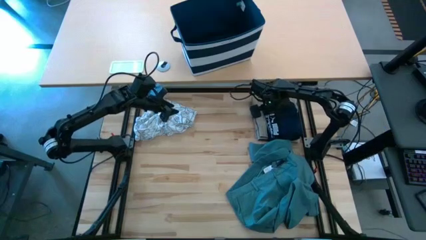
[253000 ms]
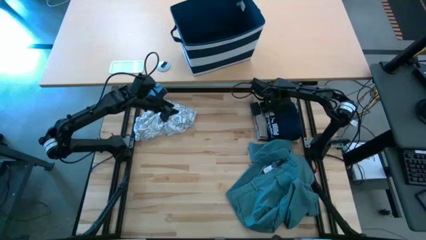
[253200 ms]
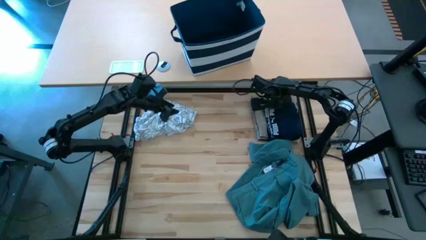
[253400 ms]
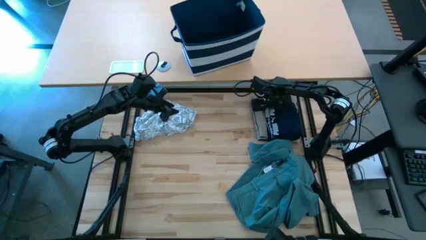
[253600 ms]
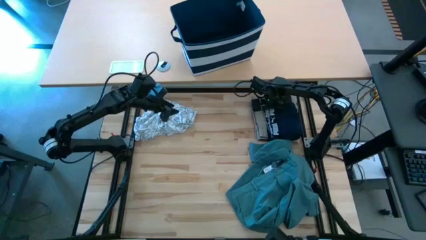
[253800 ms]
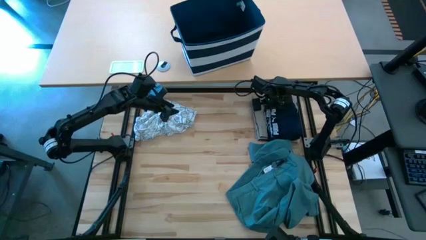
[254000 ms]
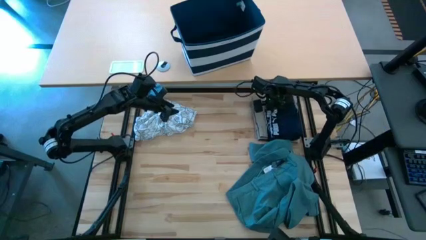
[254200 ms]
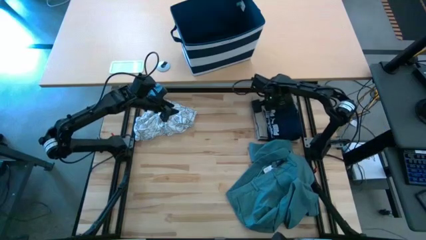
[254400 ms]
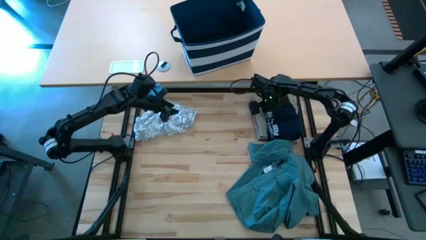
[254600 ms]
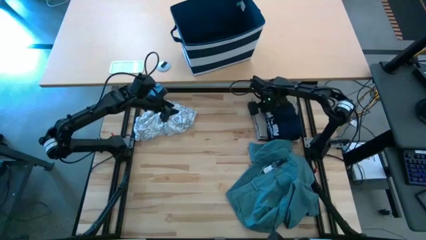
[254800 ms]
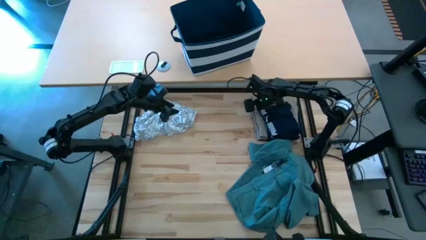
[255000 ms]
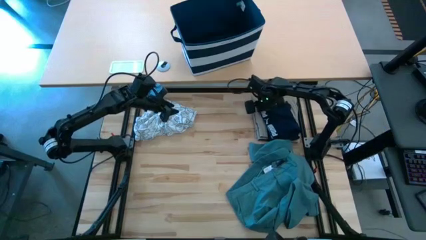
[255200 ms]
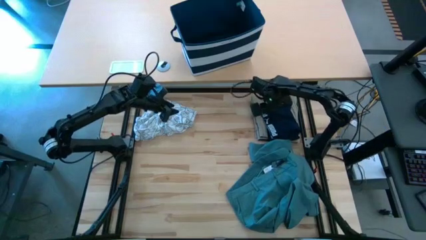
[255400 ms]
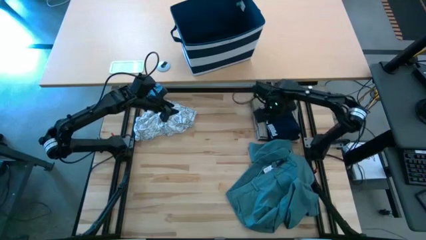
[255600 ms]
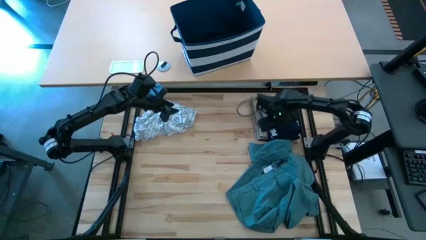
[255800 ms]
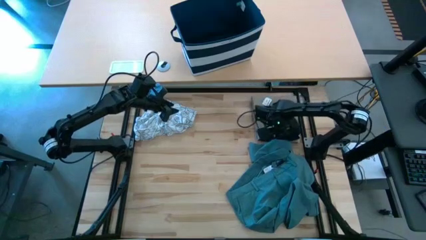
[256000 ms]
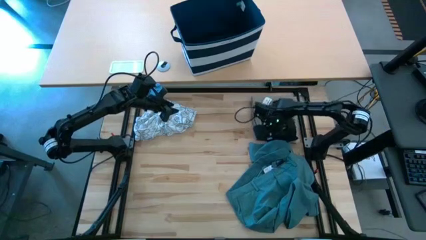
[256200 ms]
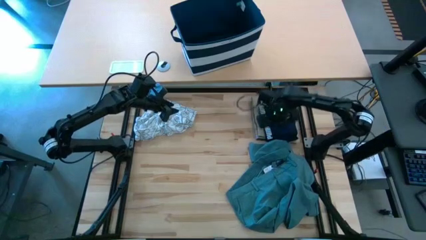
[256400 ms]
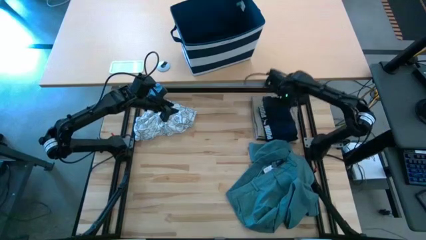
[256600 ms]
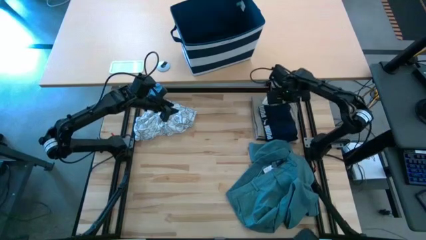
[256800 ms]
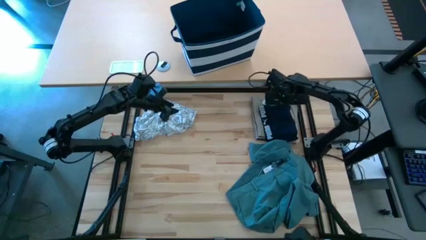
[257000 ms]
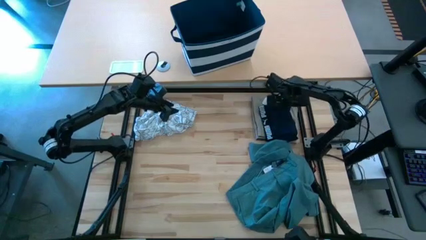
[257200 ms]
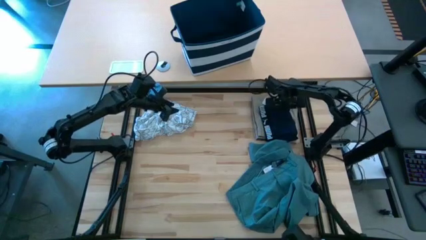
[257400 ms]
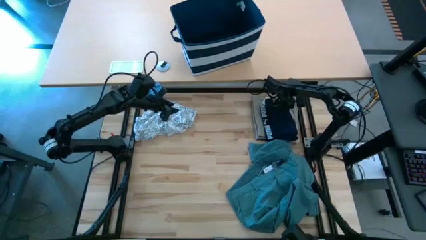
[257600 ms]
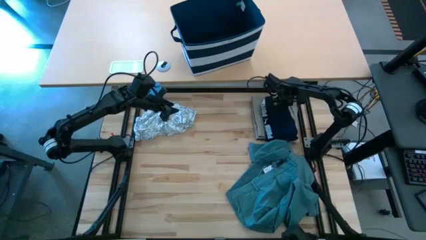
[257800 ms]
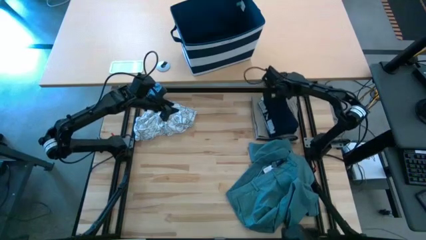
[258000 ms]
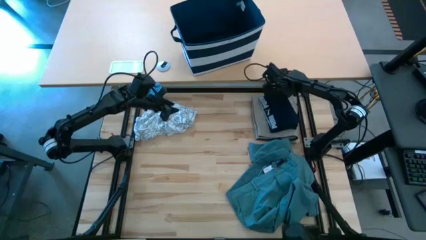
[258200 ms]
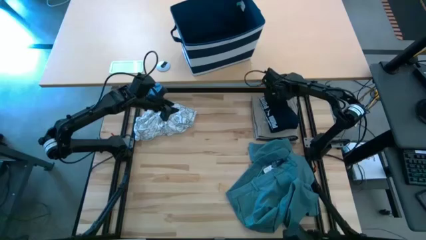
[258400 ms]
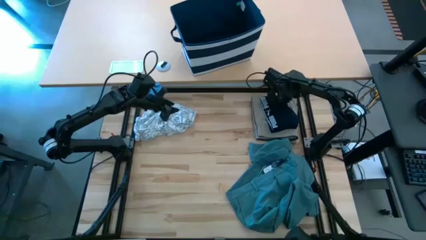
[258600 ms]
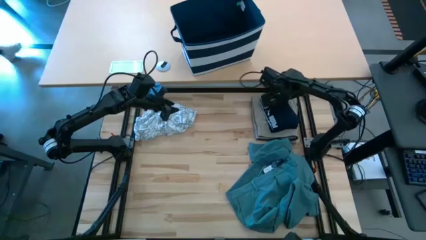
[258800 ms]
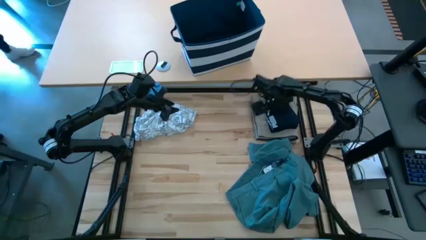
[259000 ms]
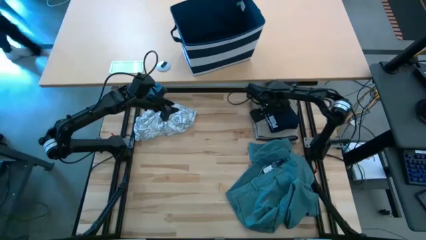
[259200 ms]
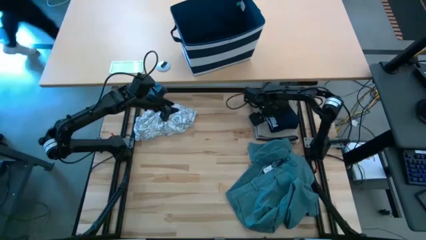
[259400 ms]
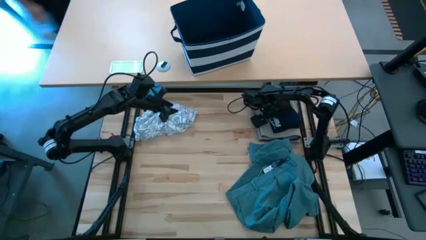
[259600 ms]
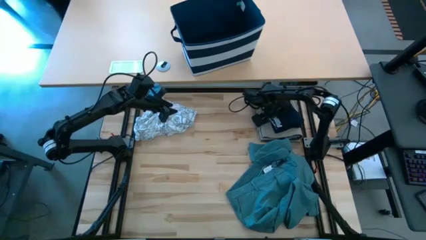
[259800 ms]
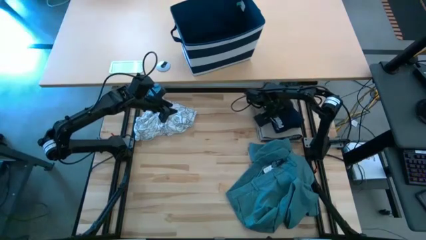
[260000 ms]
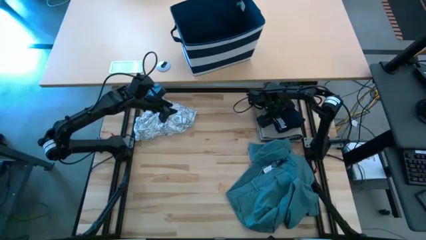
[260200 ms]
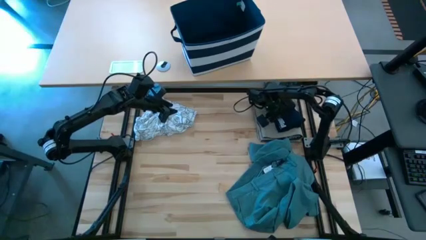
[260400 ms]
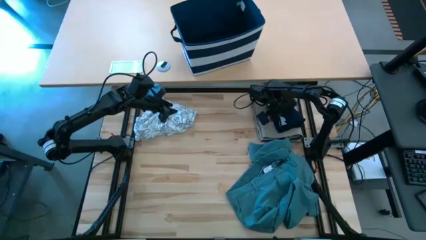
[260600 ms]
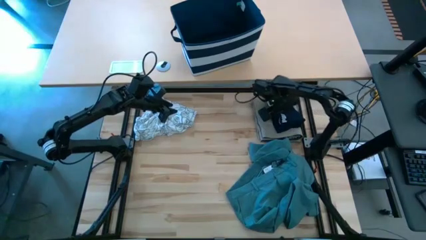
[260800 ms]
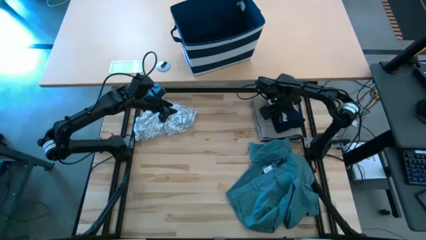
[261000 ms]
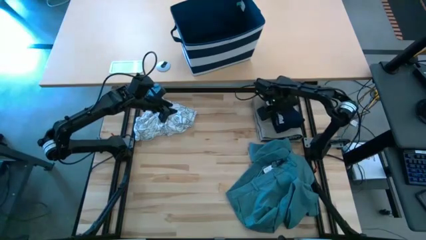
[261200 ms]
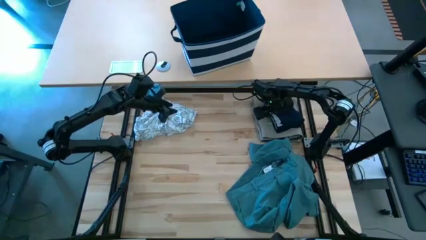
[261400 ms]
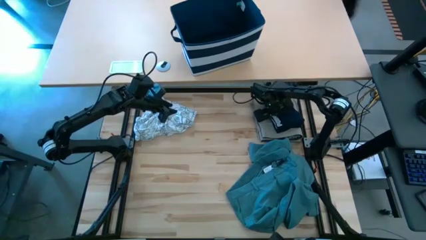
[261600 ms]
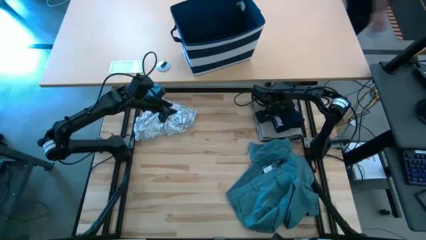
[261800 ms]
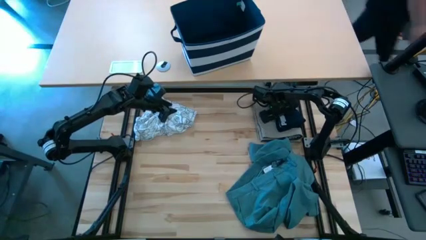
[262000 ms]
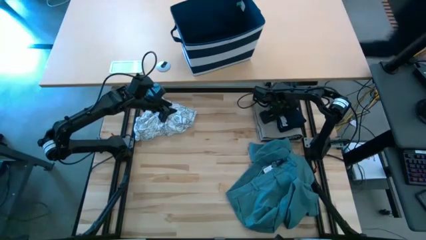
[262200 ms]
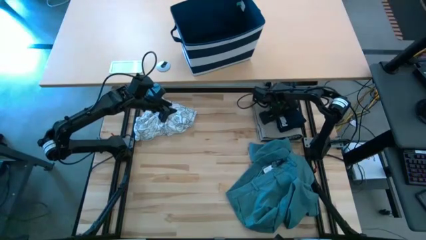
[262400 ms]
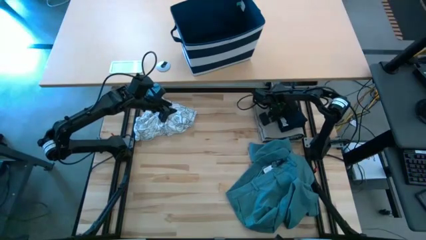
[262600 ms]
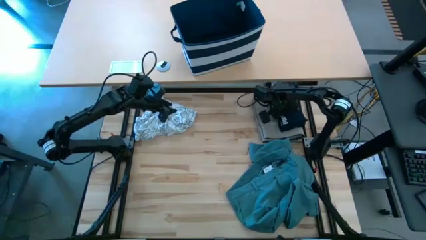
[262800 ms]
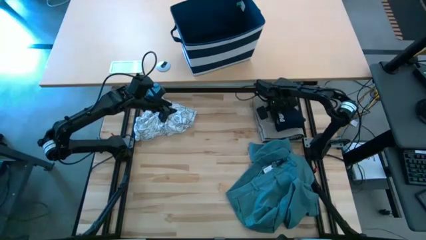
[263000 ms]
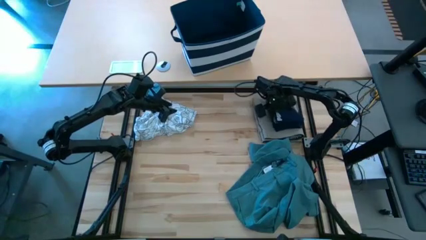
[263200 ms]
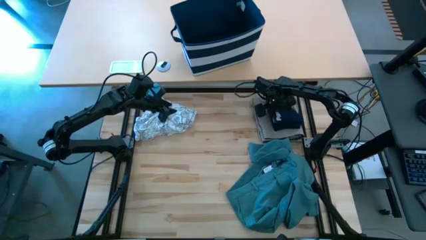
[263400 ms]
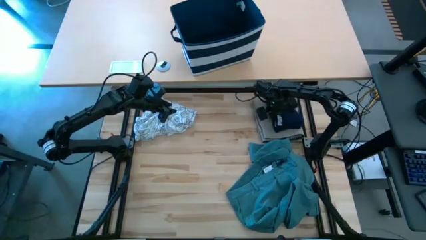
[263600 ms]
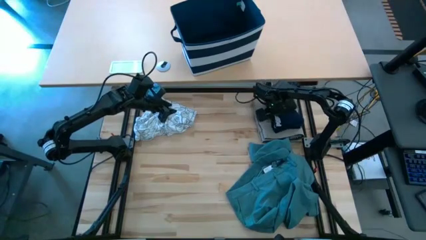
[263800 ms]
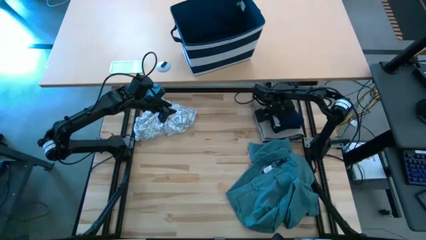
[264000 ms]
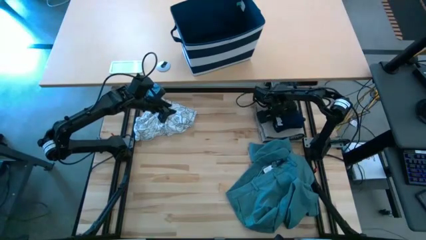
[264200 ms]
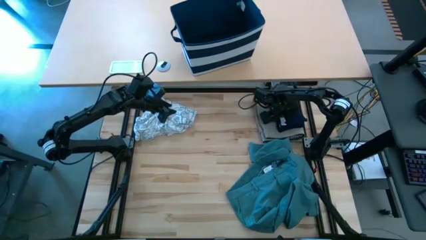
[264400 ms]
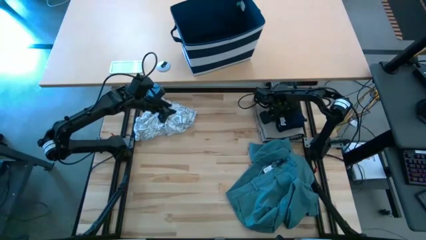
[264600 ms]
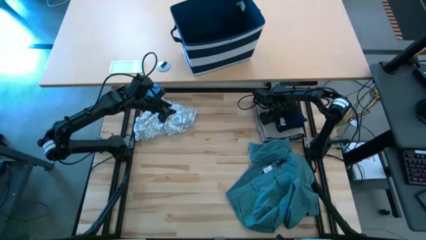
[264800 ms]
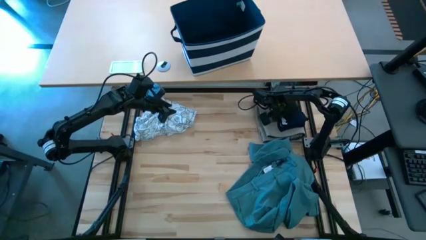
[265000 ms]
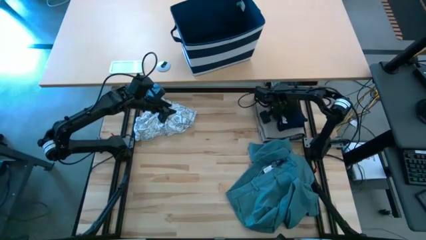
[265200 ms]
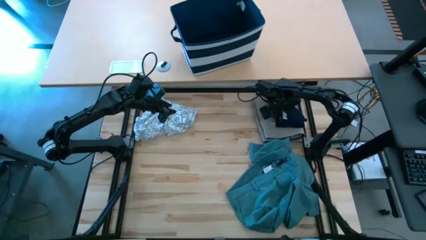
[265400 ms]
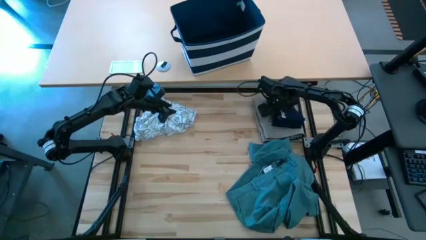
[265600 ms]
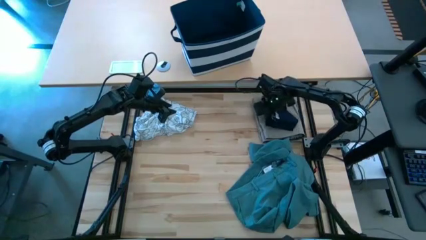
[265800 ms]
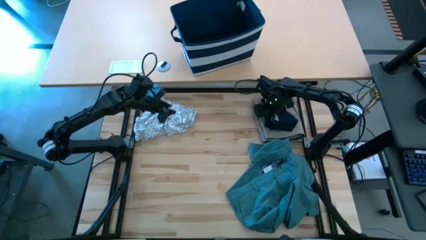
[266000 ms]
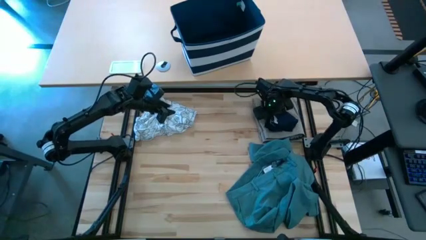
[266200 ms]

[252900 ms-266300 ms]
Task: Fold Laundry from Bin
Stack the folded blue boxer on top of the folded brown shorts

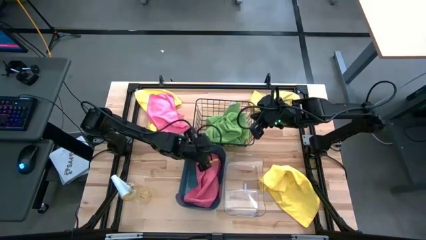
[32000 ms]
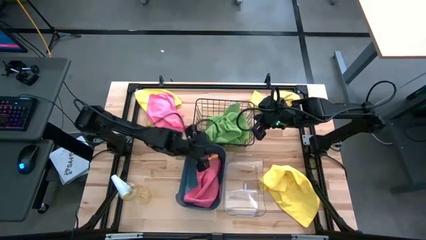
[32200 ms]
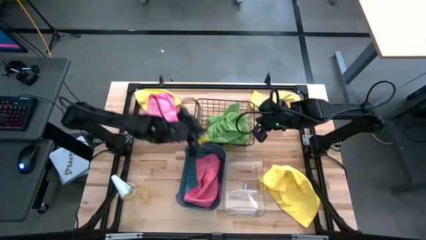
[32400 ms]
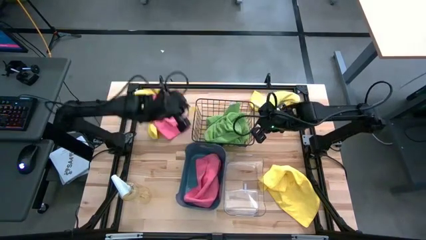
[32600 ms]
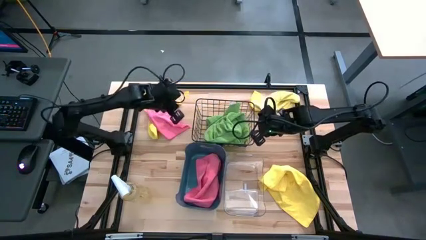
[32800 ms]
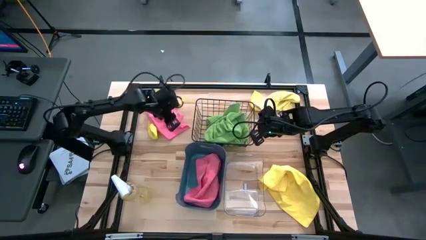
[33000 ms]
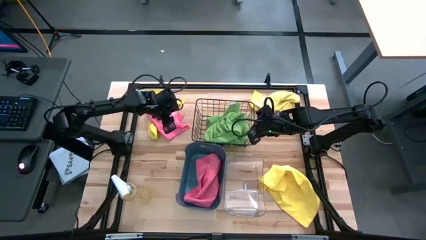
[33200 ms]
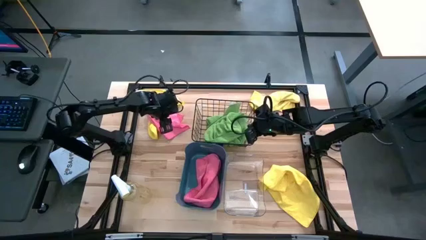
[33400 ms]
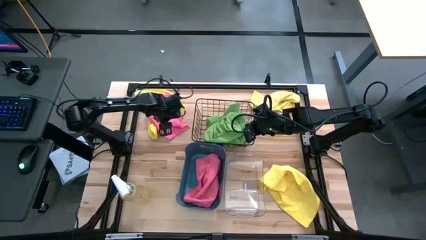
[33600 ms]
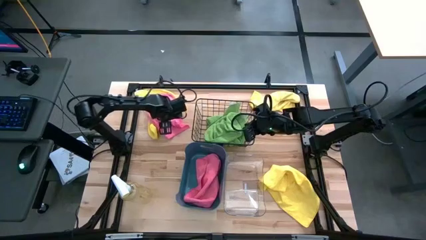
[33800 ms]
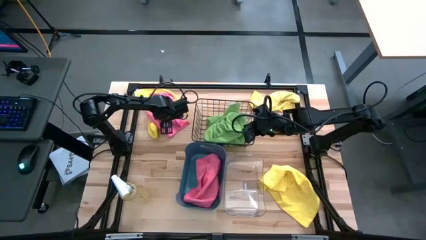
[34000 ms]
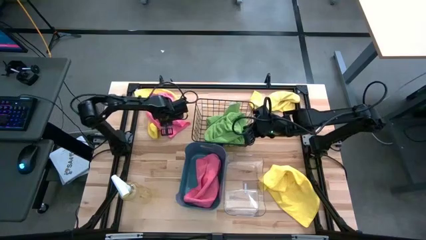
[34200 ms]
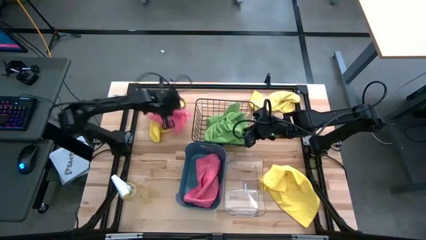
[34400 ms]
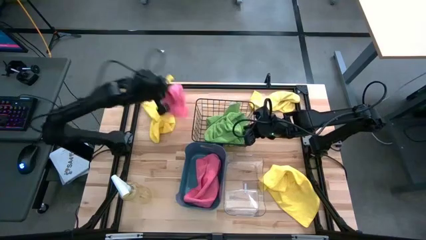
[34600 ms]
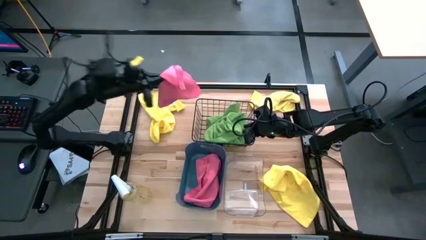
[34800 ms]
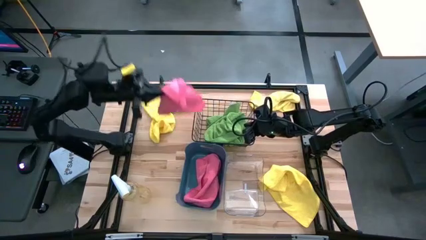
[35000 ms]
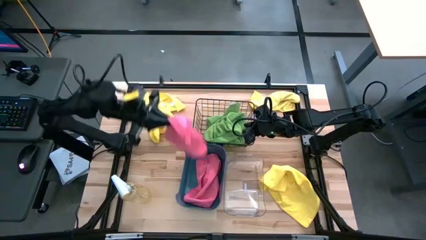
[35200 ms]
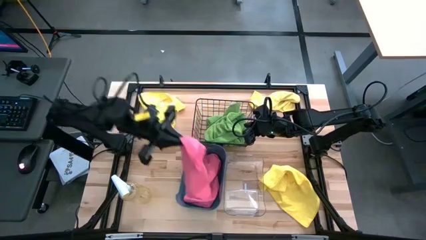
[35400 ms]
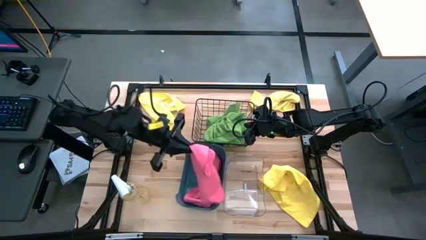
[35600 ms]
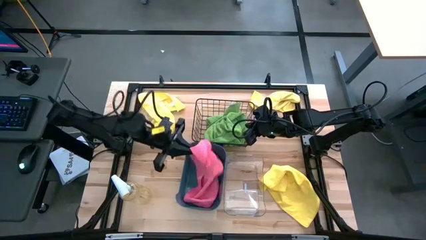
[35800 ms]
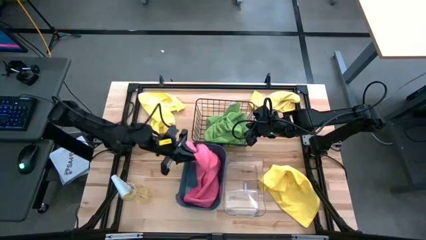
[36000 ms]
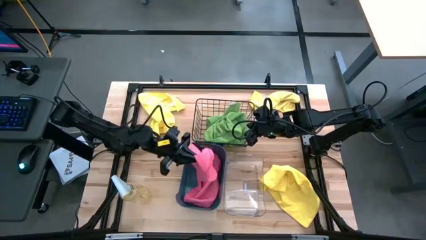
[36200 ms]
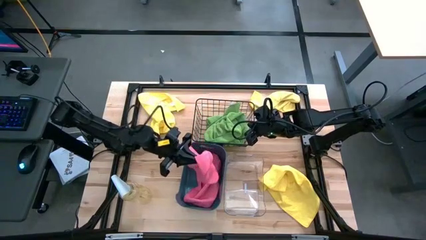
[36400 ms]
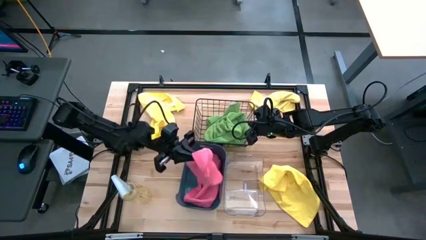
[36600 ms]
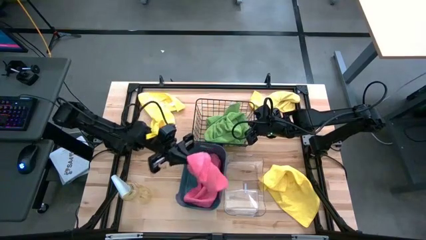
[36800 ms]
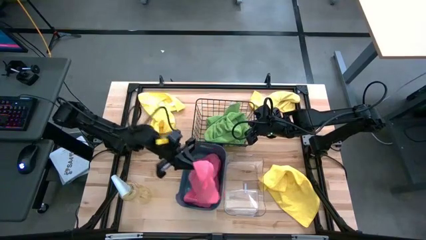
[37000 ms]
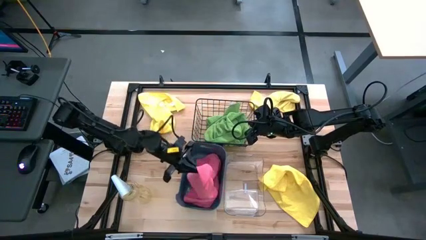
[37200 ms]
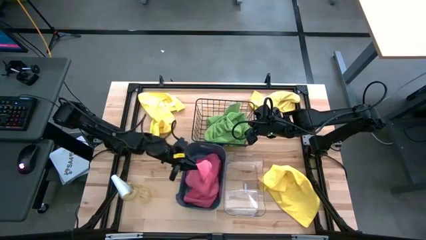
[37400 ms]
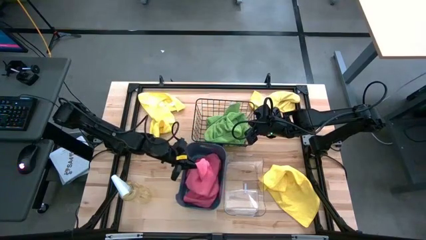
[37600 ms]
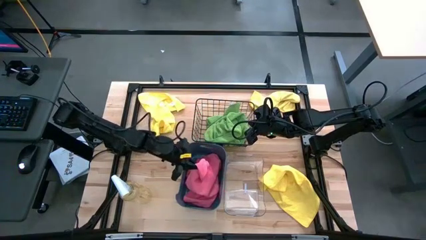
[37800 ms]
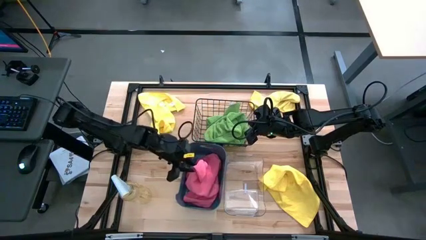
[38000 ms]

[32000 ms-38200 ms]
Task: Sort microfiber towel by color & place in baskets
Put the pink microfiber cloth into the blue bin
